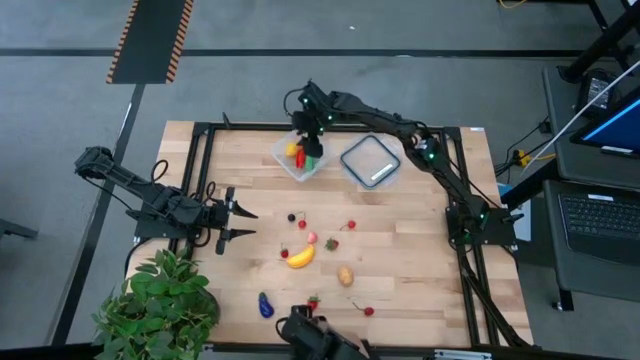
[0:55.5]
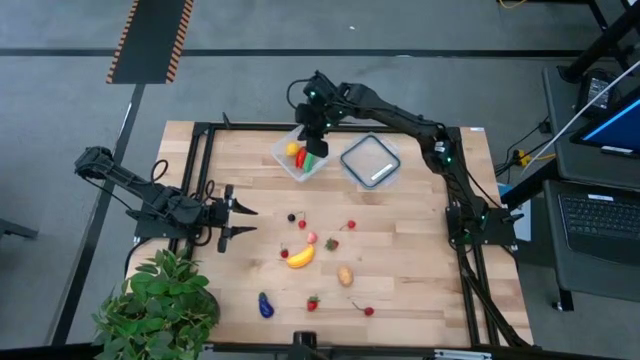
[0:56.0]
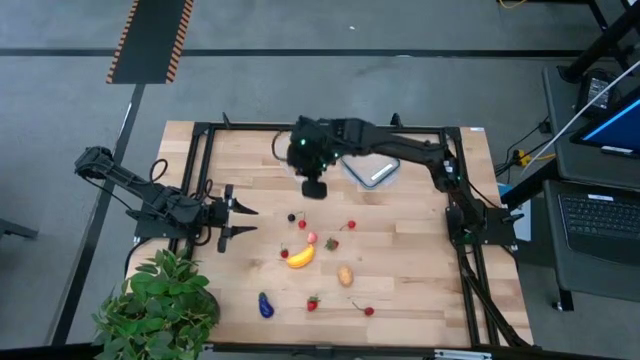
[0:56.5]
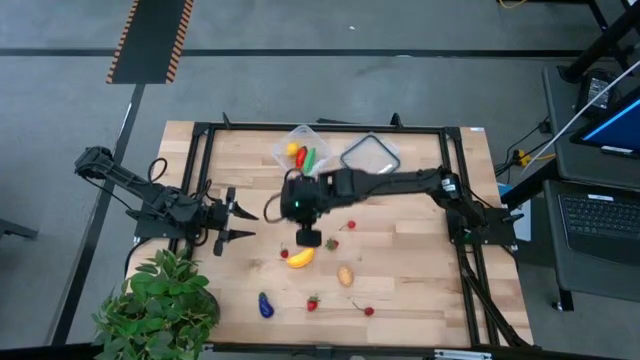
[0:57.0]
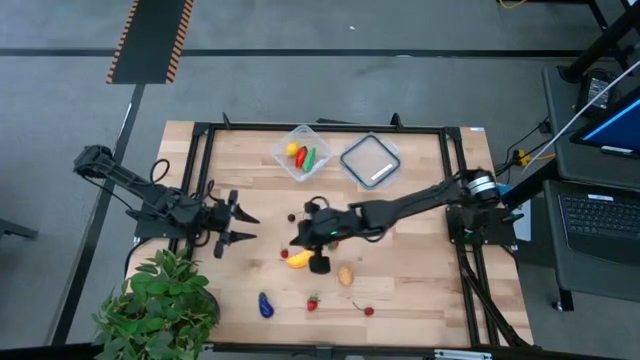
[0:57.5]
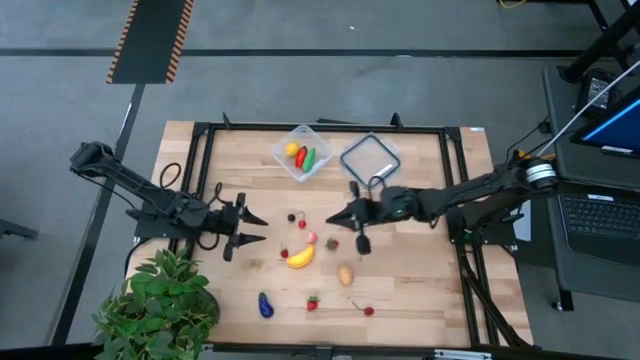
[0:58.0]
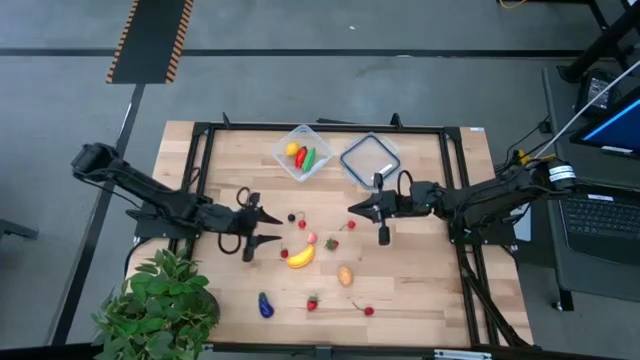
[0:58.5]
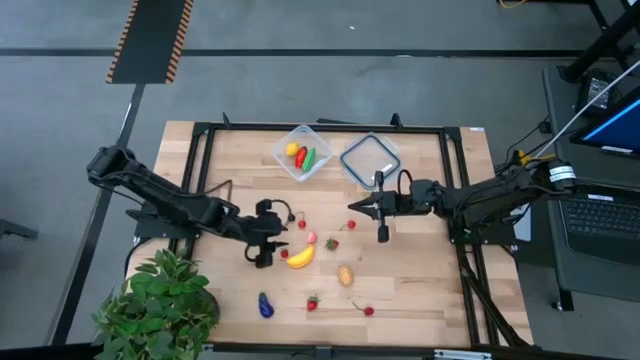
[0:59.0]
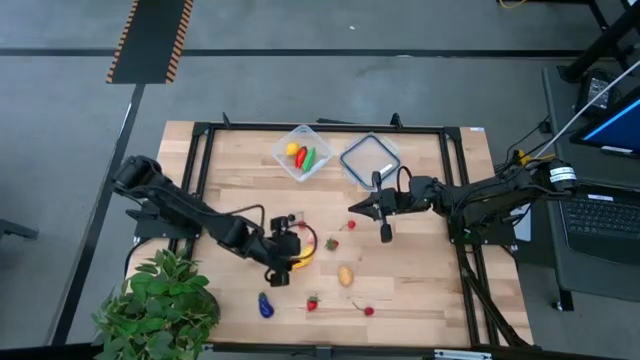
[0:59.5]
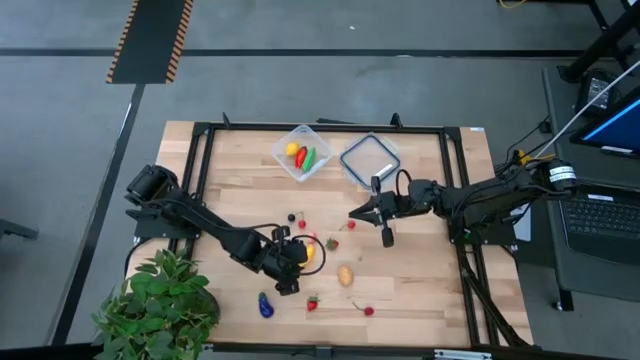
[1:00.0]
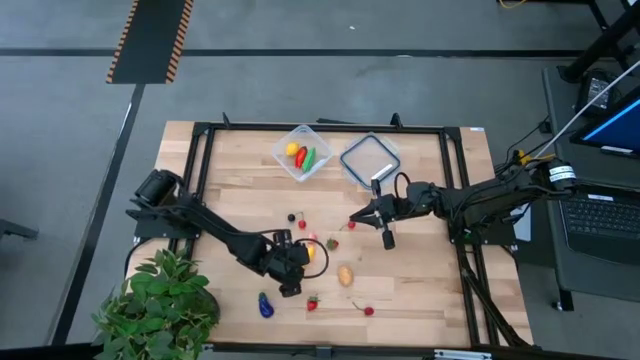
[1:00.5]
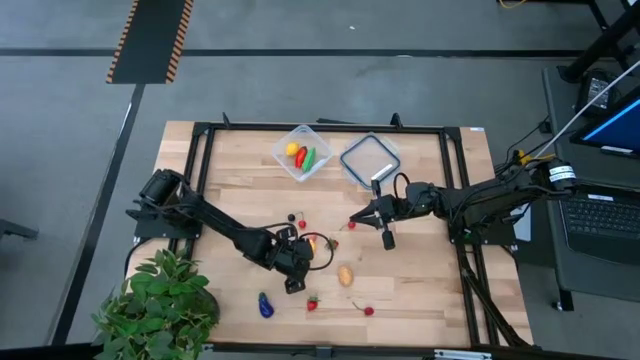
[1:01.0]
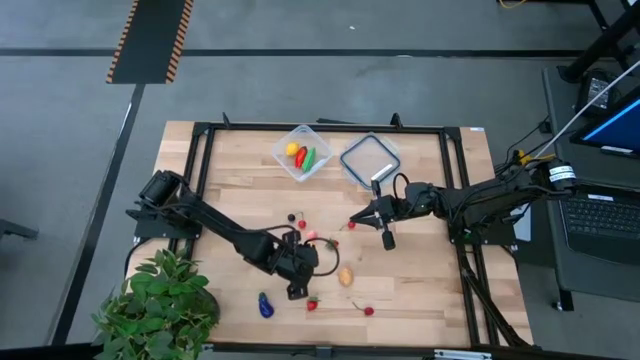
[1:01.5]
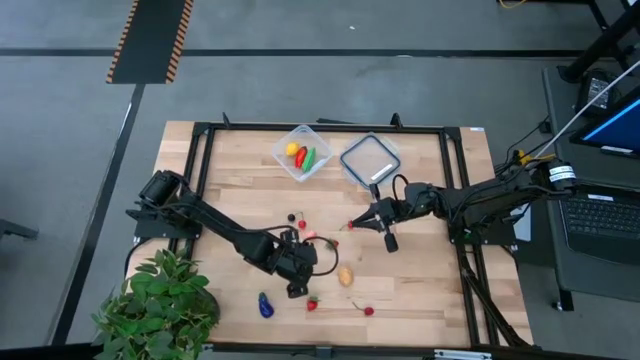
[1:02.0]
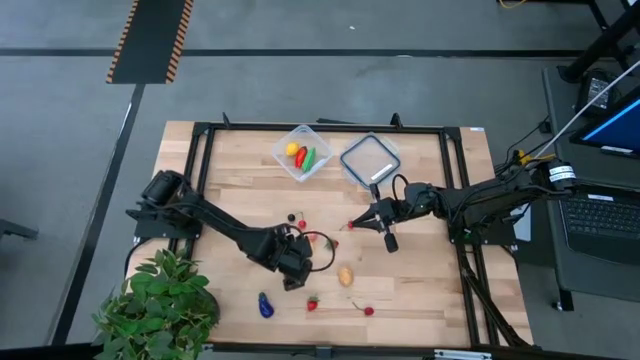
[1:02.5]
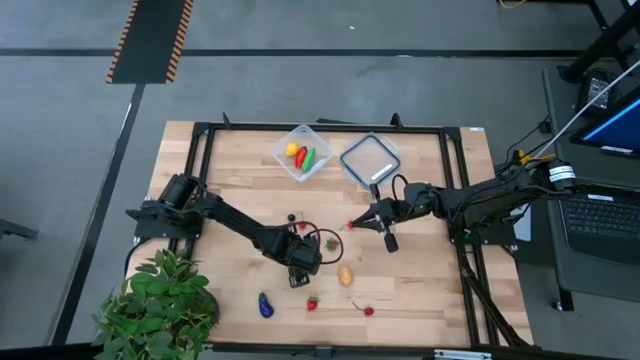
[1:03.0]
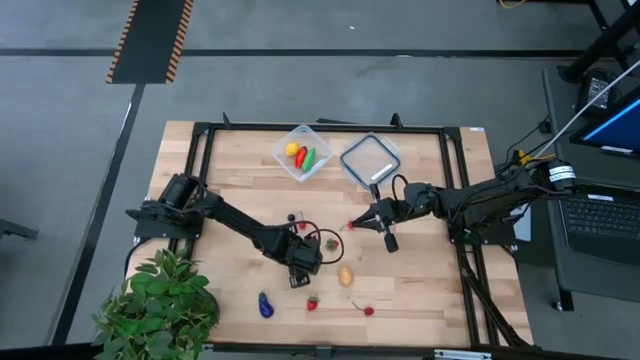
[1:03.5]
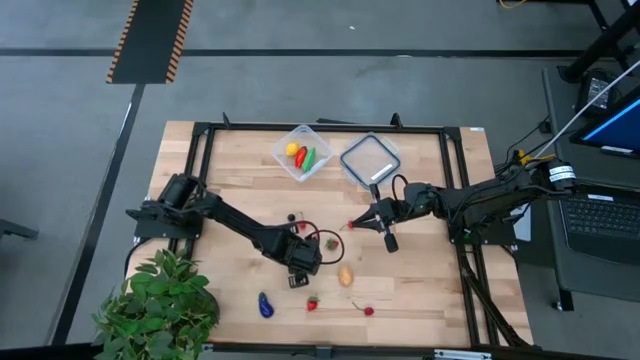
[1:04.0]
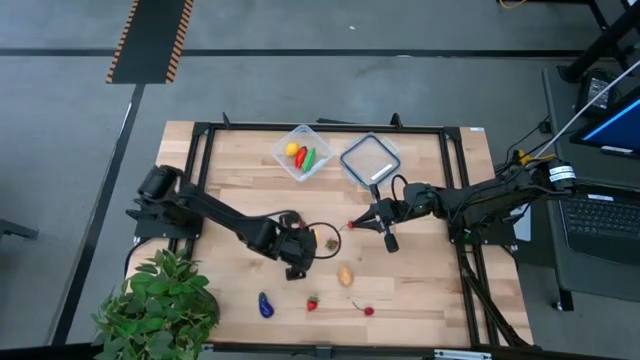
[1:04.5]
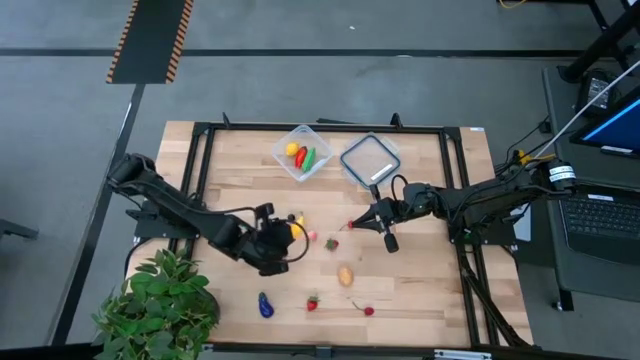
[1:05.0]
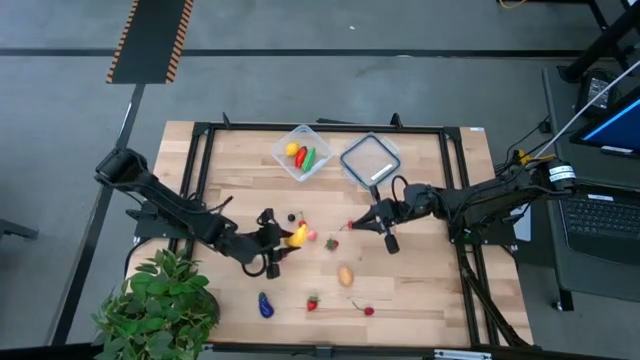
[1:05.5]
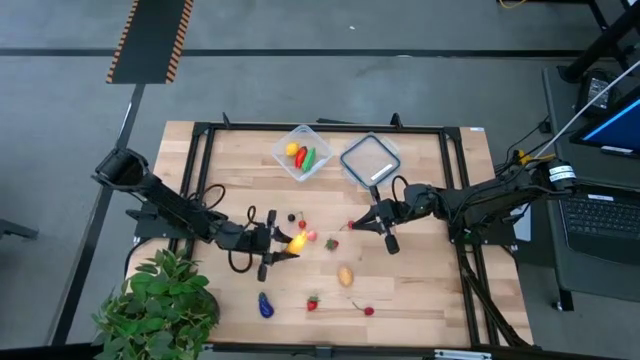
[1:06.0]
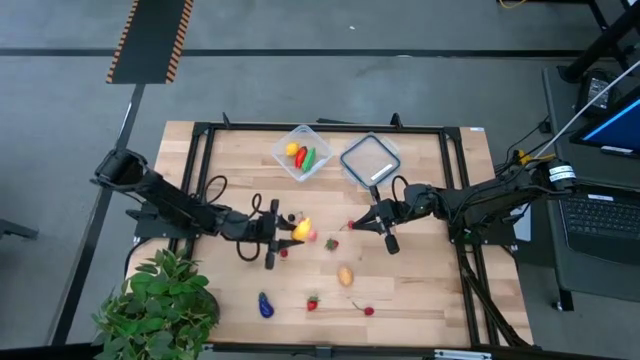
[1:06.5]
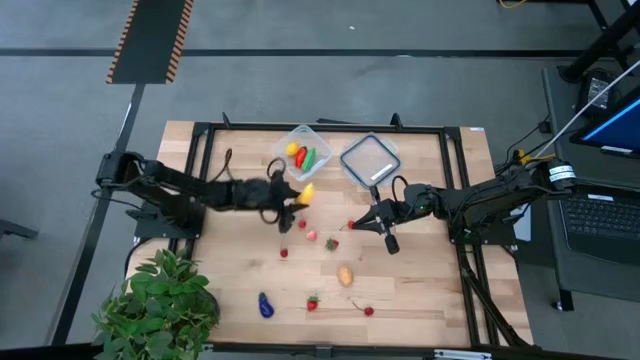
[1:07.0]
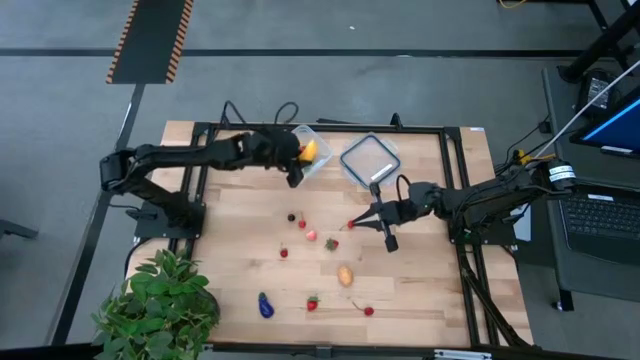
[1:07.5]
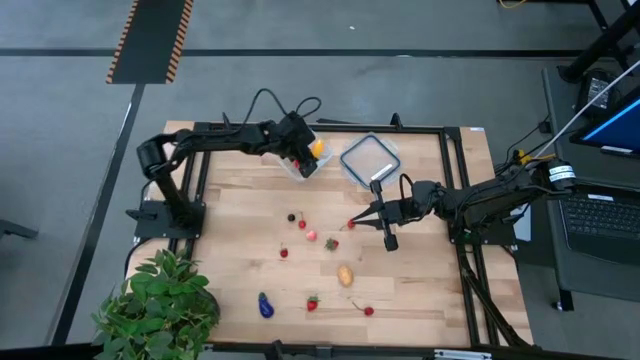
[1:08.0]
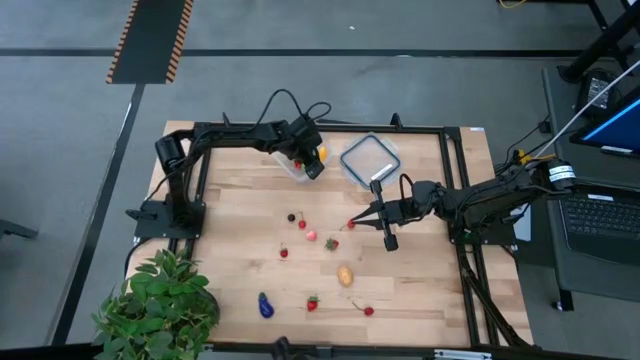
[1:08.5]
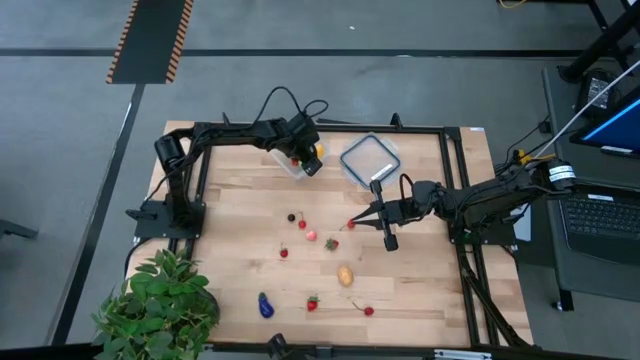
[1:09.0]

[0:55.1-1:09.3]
Task: Pick and placing Produce into tupperware
Put the banana into the transparent container
